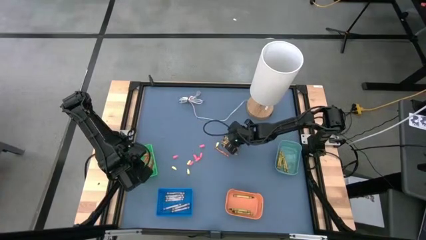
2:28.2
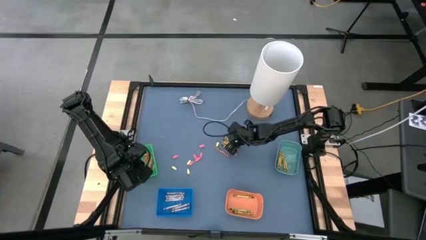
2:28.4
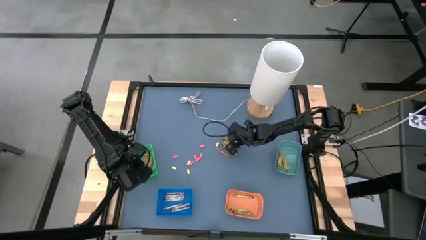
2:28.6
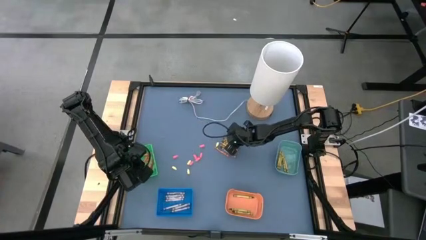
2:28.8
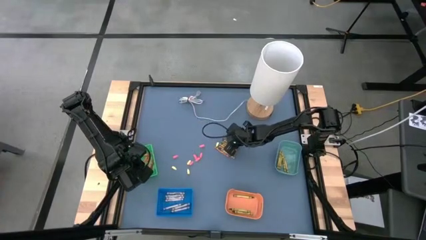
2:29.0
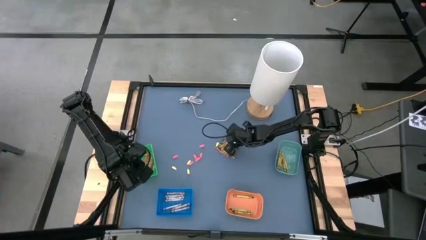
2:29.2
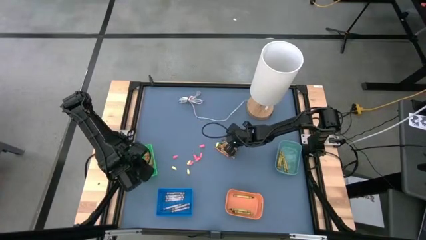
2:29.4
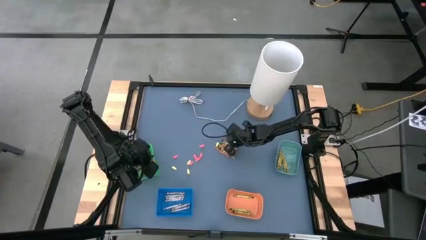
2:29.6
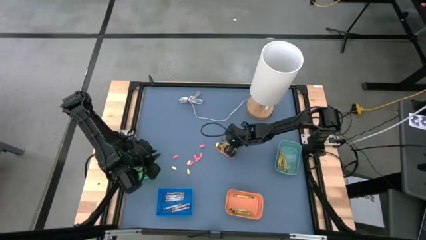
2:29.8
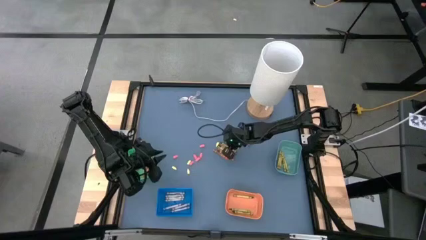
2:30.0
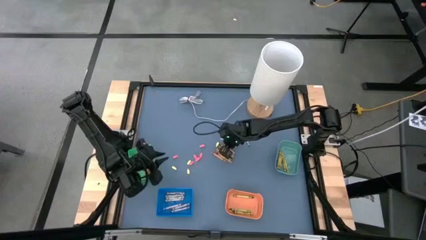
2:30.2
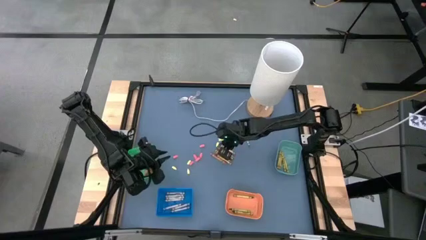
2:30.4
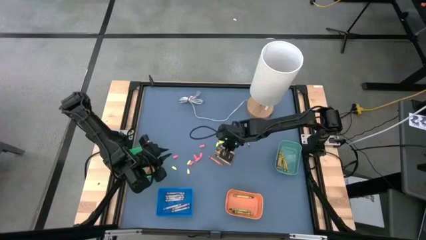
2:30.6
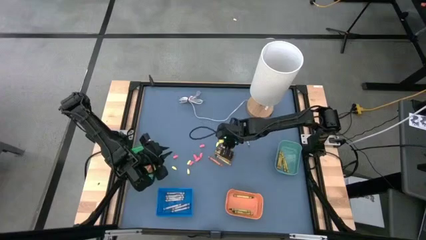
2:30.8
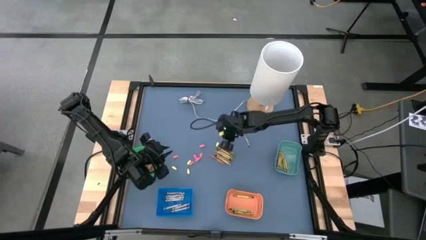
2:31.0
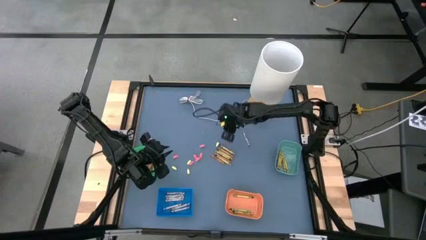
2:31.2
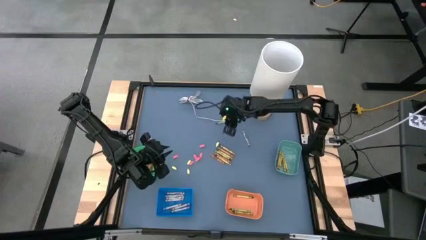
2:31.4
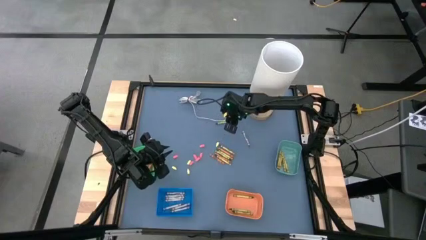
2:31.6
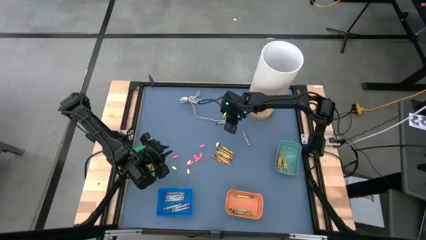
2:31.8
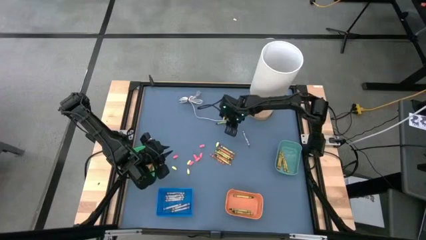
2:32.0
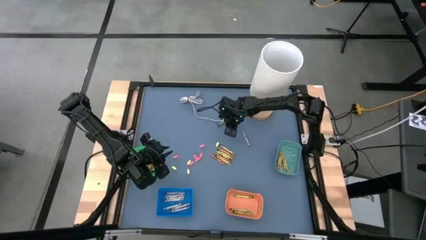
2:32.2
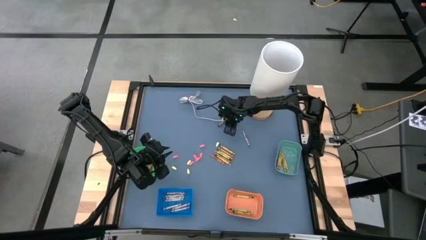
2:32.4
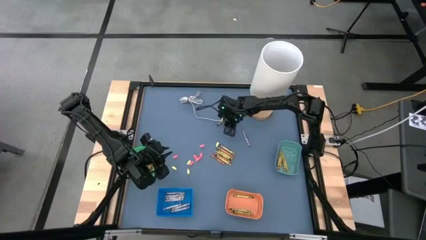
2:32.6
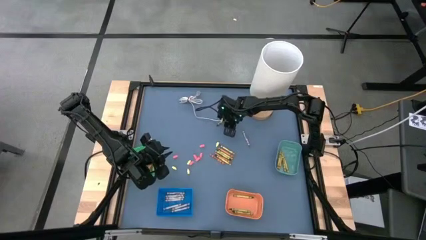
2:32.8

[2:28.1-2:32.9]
Task: Sort crayons
Put the green crayon into the orange bin

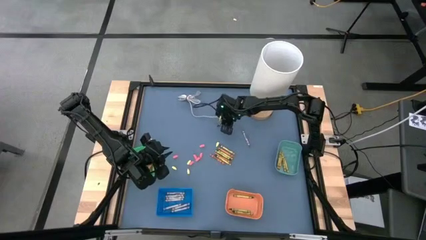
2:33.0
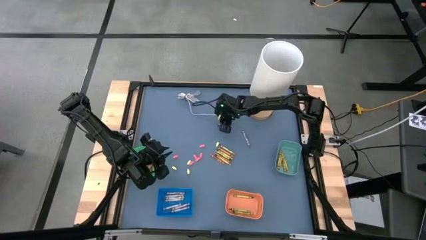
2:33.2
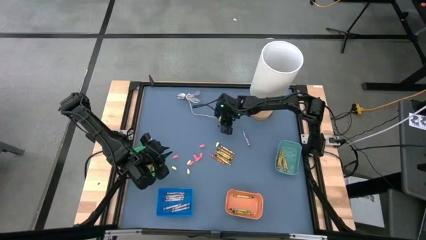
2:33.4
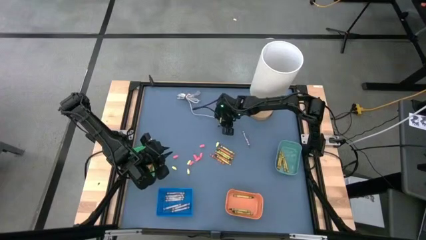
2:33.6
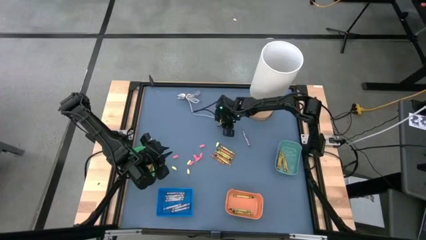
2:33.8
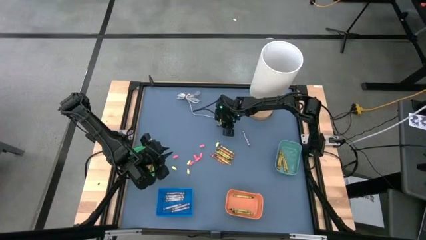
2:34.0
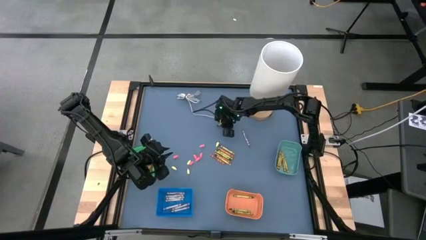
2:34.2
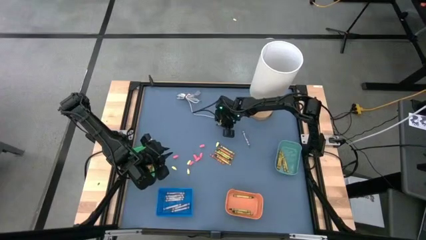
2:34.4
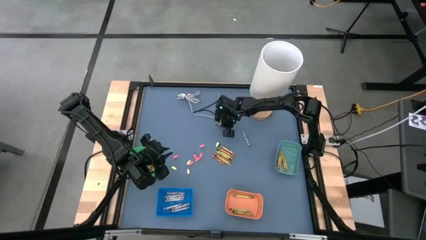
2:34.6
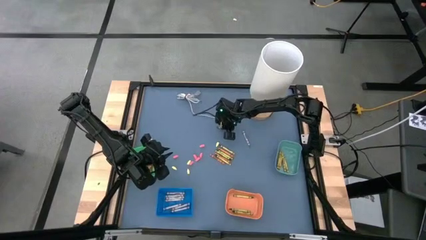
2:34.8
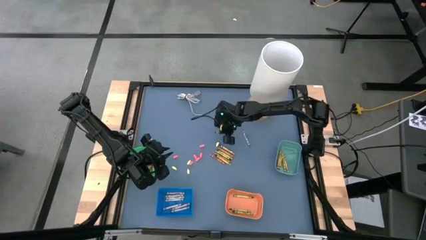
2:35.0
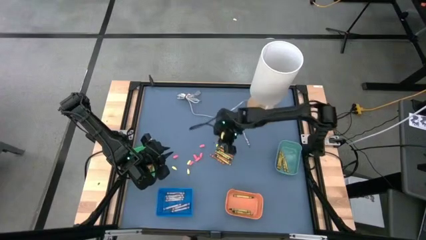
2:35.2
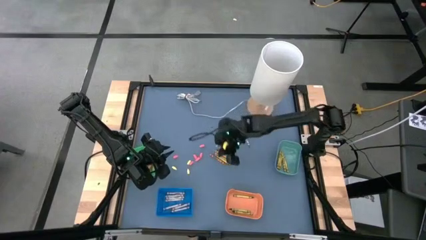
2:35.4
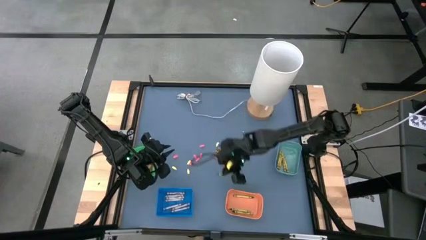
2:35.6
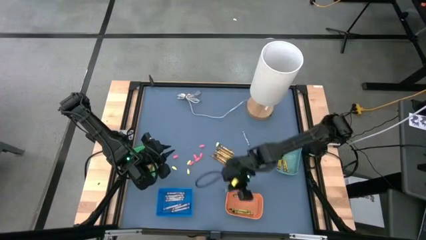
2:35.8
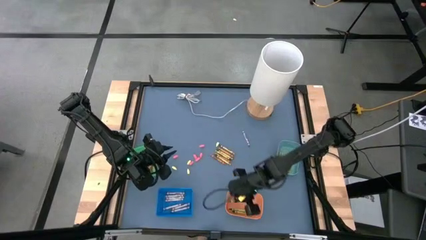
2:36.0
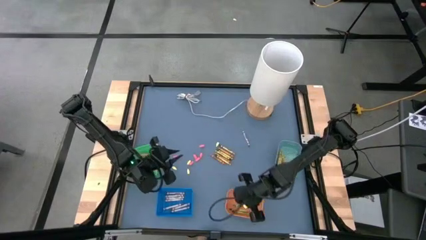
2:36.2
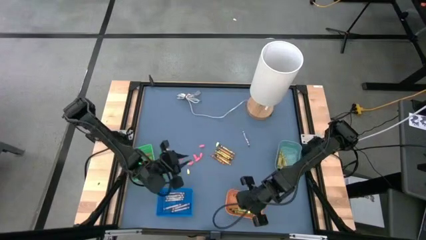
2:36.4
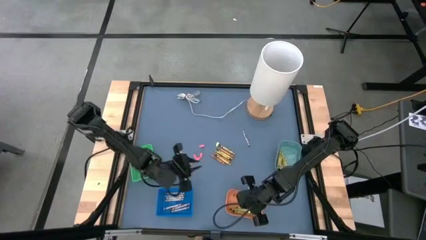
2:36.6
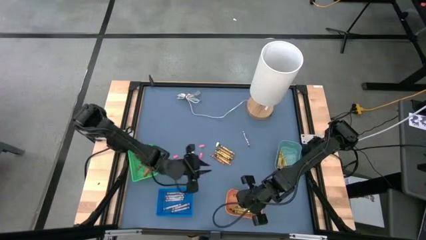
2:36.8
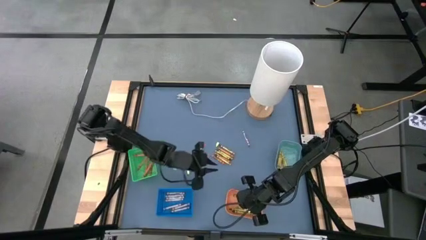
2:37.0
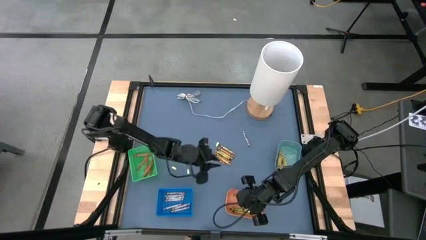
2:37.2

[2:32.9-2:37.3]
Put the green crayon into the orange bin

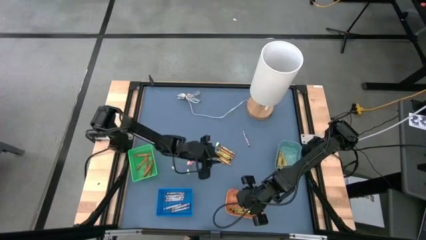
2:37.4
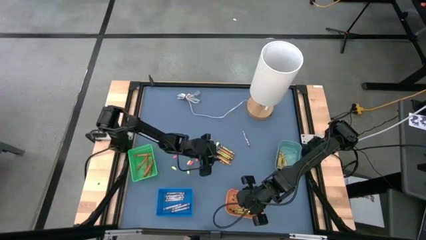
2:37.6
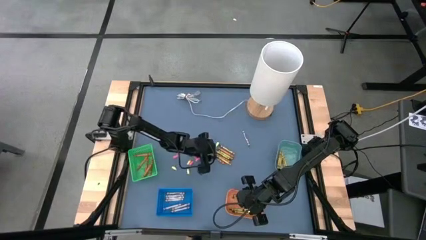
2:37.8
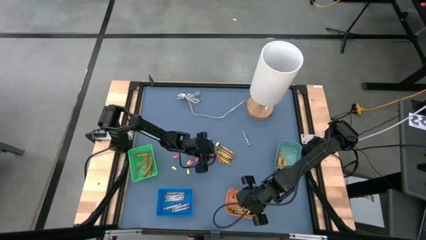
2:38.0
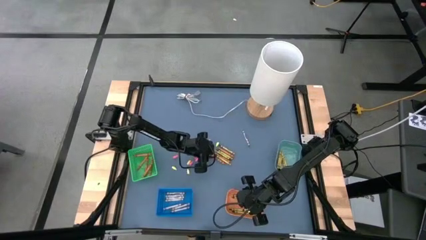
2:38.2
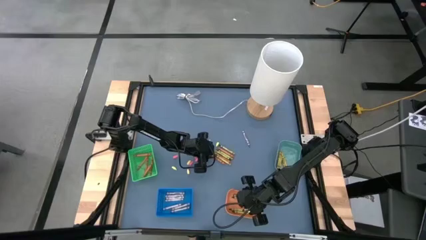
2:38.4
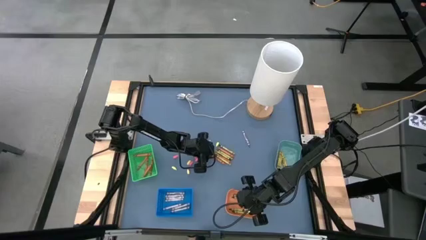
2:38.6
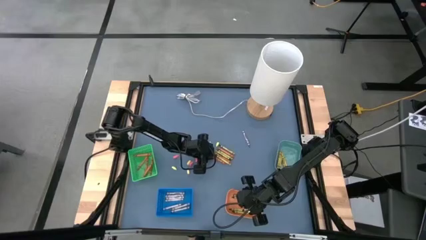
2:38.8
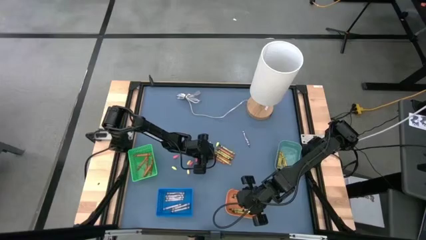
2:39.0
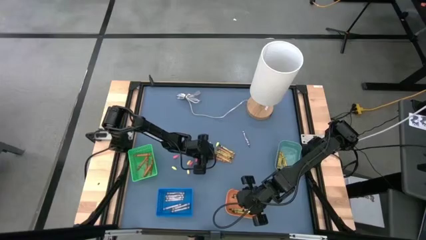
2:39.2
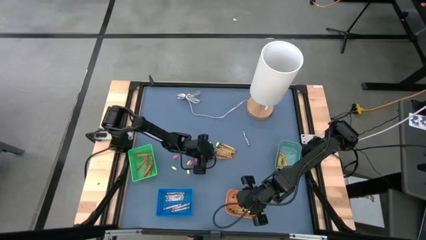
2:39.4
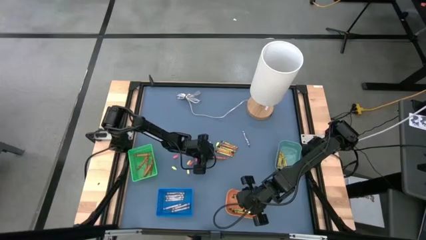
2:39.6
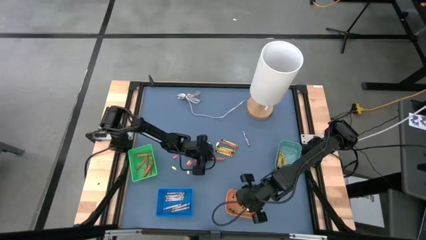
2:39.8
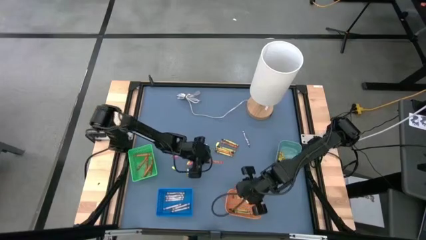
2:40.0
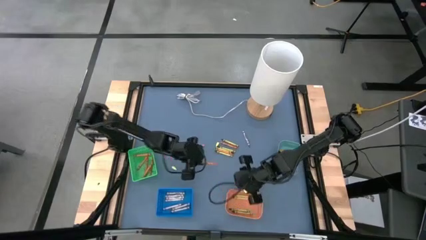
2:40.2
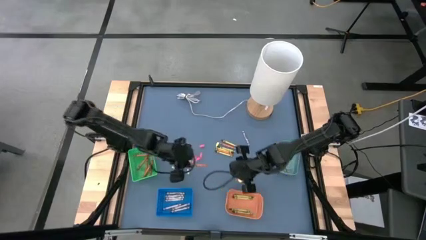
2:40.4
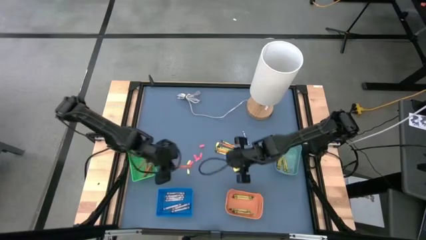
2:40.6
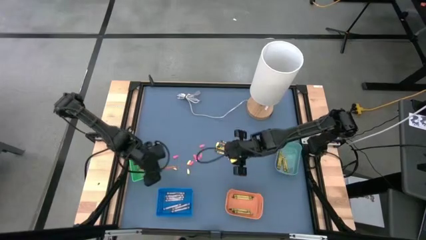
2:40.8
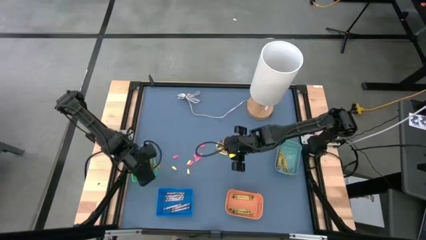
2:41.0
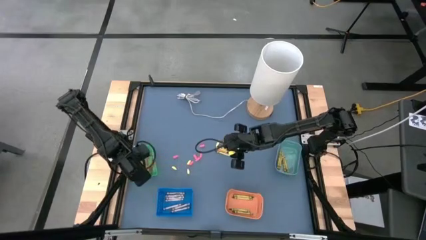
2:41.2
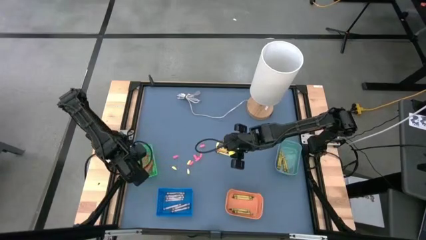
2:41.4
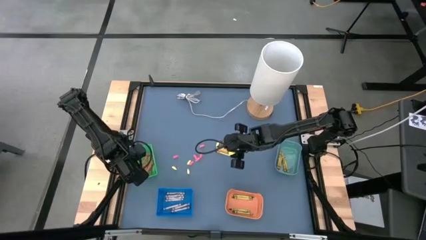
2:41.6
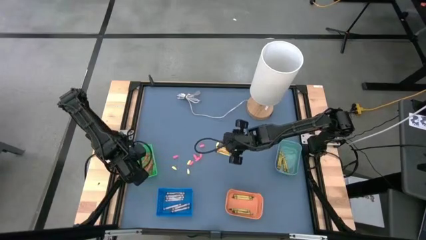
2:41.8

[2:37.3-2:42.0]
Put the orange crayon into the green bin
